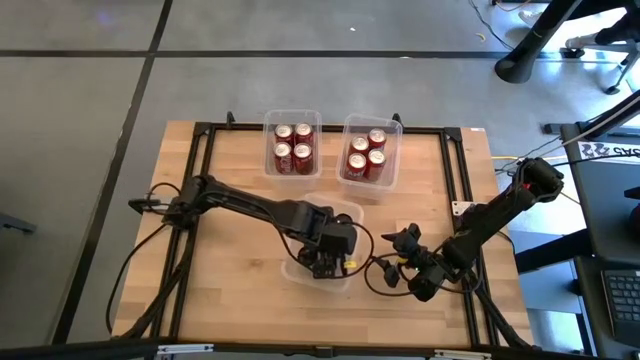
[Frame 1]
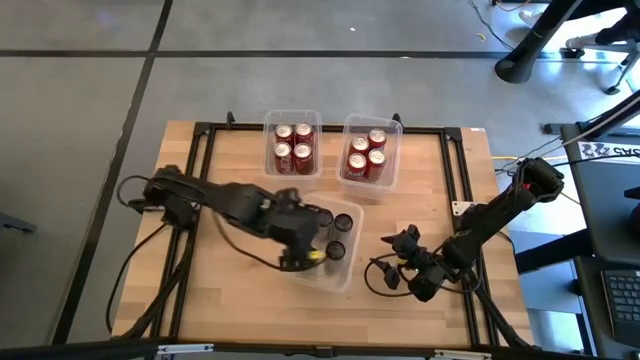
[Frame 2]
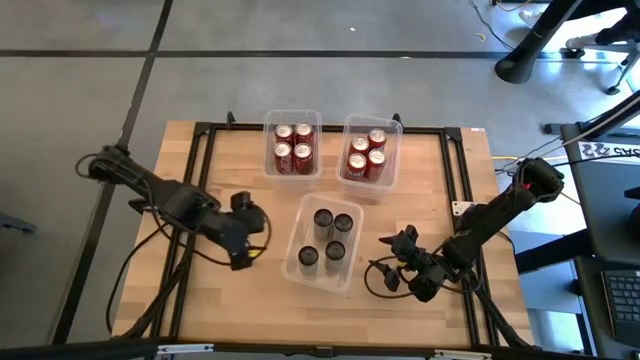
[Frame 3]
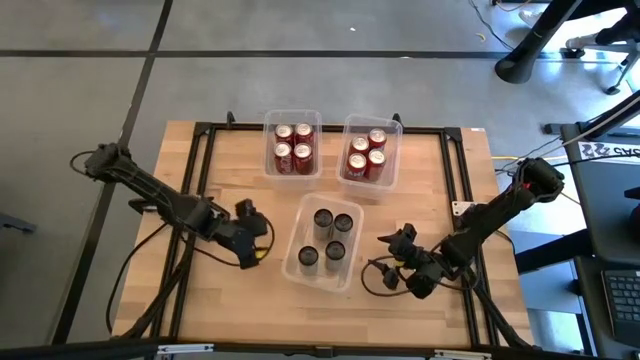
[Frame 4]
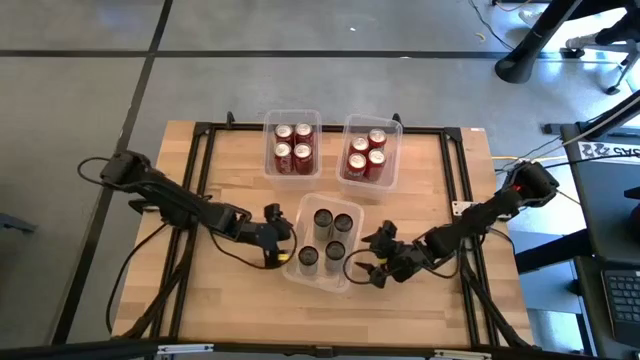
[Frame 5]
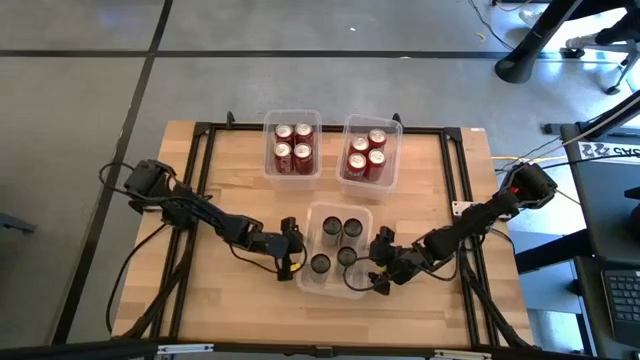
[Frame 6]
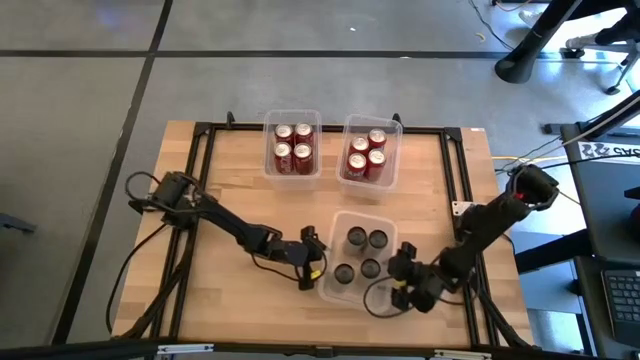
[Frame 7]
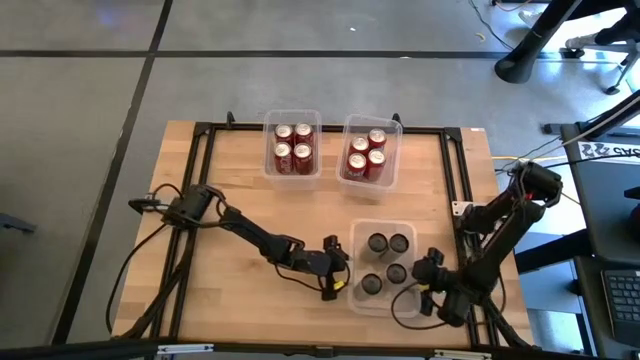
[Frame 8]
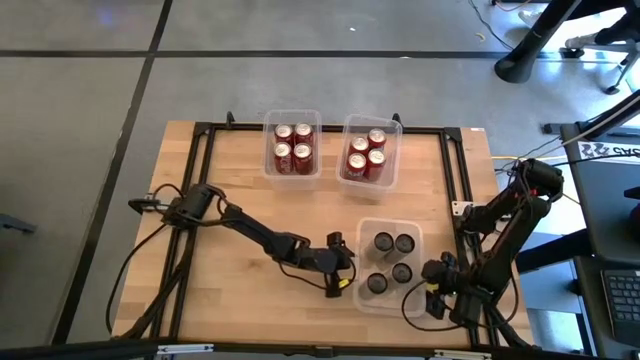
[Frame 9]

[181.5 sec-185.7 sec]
Task: Sort soda cans
Move the bottom center transparent bin to the bottom right of the table

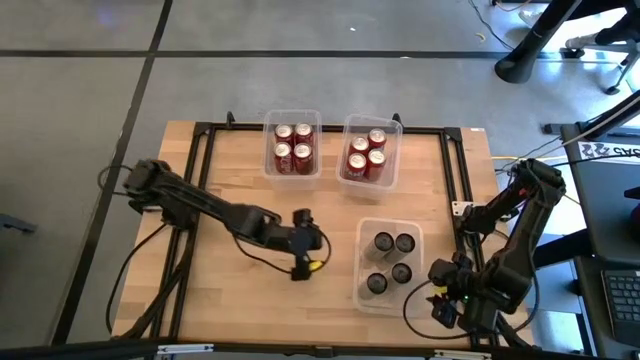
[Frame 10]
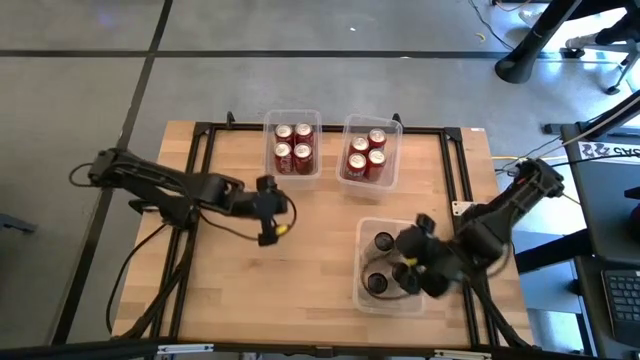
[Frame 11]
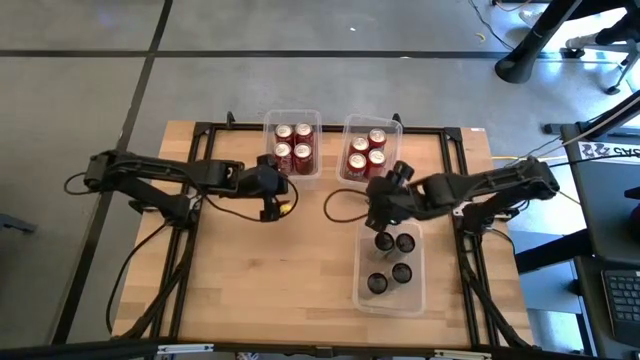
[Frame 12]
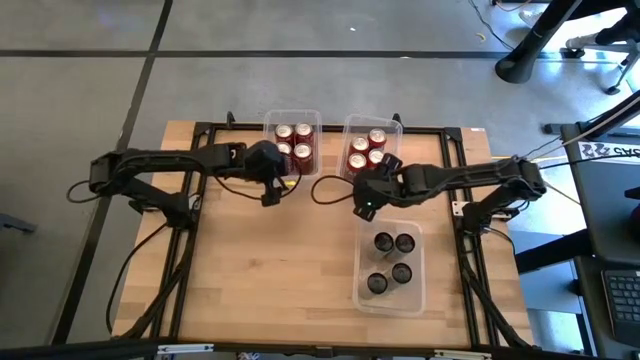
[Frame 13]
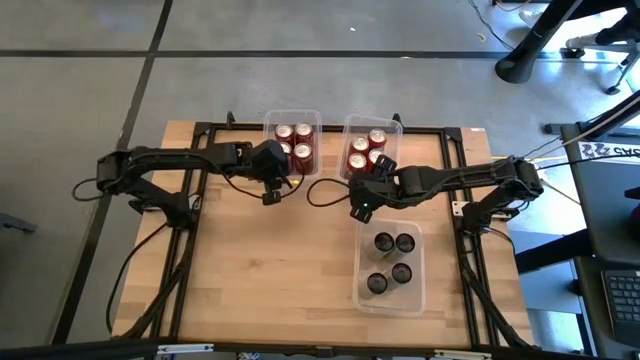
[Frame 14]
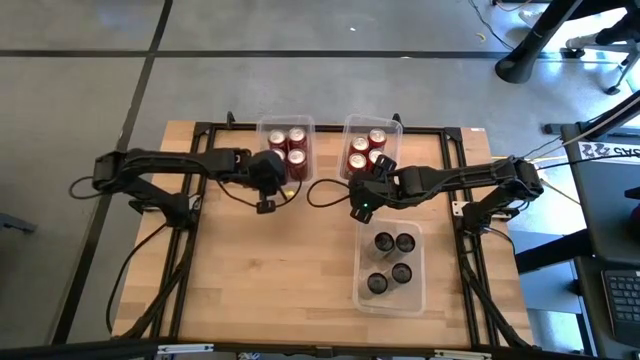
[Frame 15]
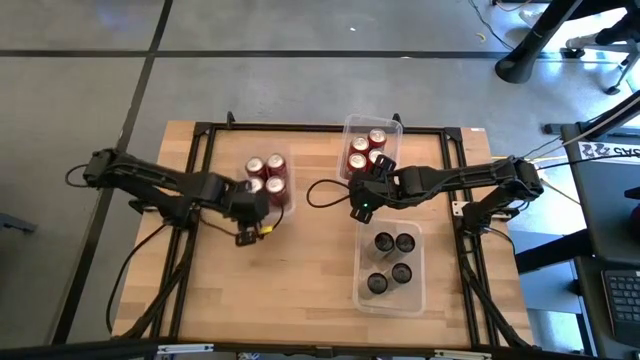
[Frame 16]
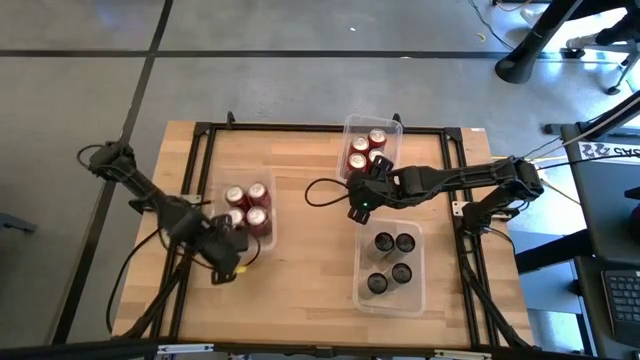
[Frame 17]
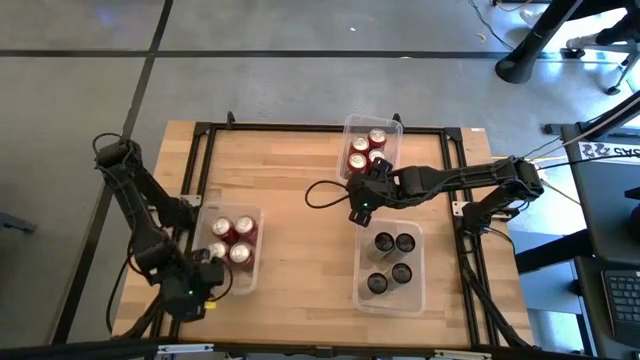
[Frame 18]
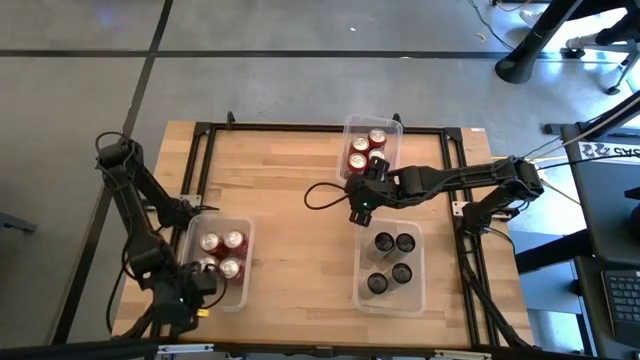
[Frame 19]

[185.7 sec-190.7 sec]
Move the top left transparent bin to the bottom left of the table

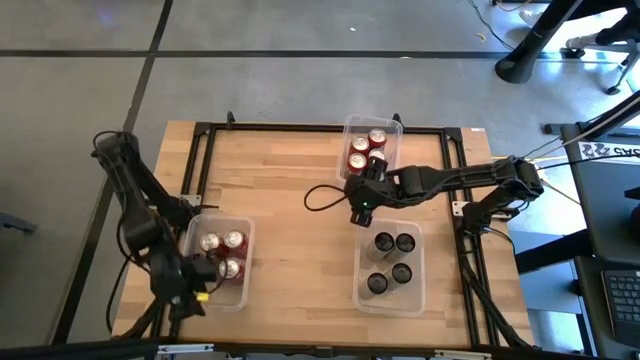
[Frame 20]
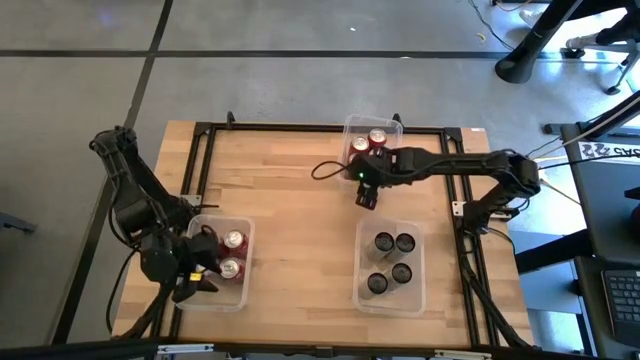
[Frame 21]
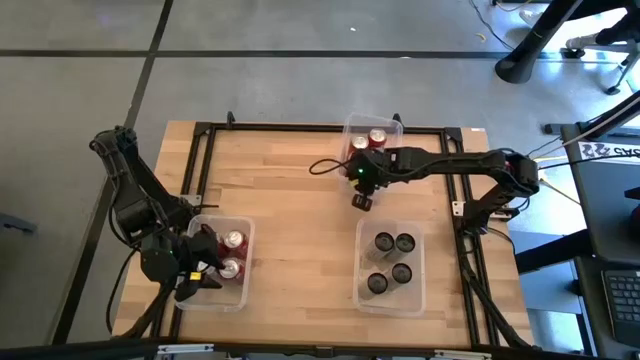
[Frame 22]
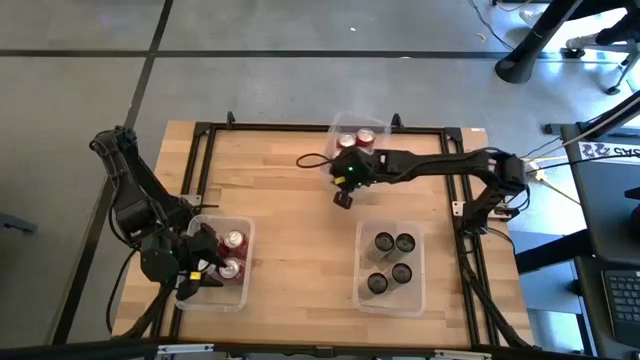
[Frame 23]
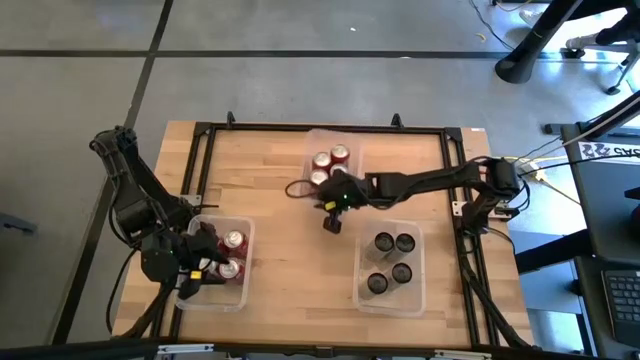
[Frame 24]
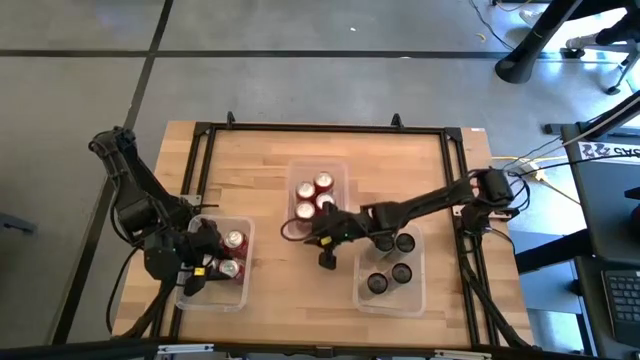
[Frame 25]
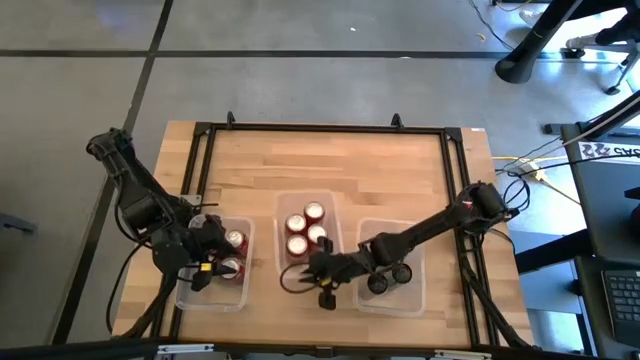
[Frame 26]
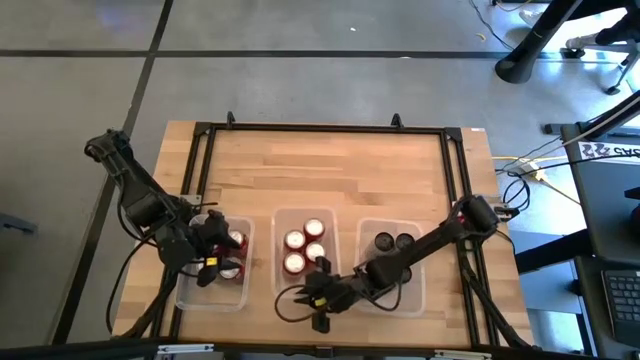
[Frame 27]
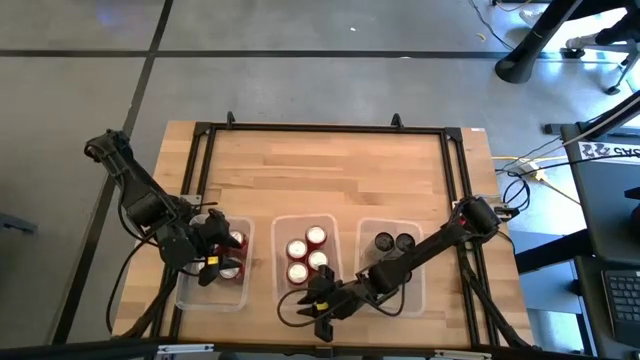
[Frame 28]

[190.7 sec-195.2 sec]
Move the top right transparent bin to the bottom center of the table

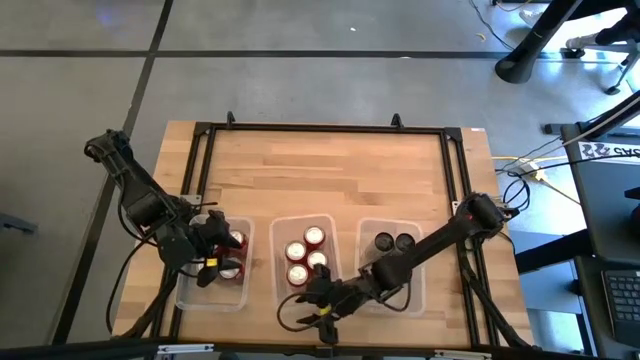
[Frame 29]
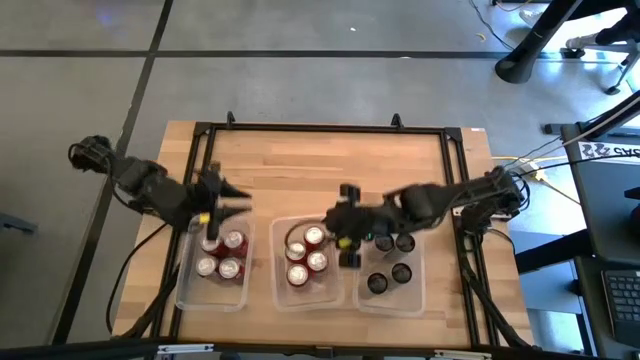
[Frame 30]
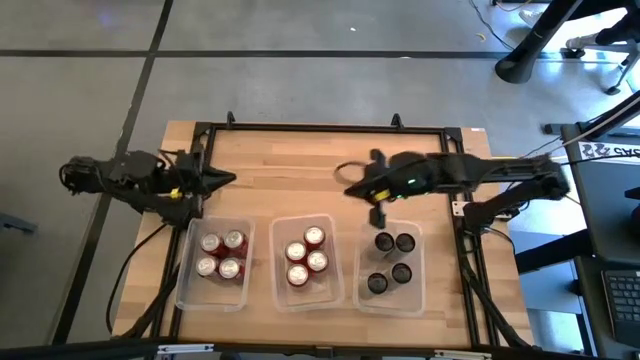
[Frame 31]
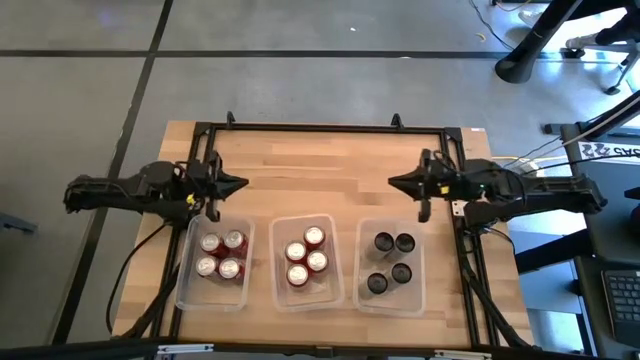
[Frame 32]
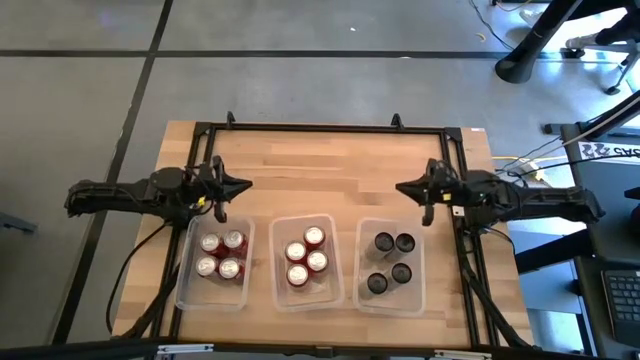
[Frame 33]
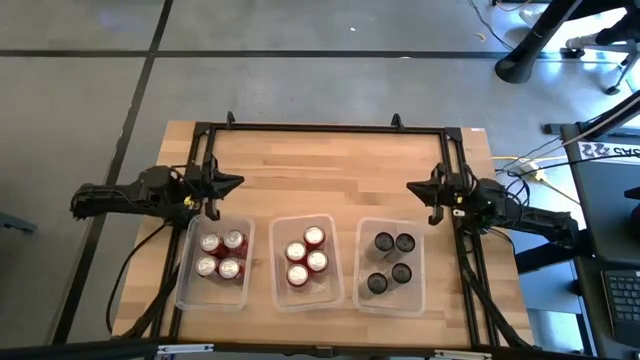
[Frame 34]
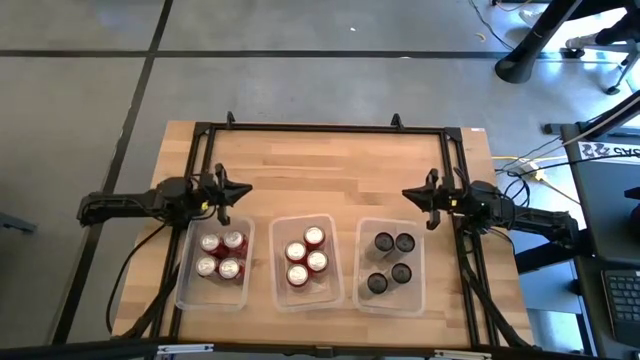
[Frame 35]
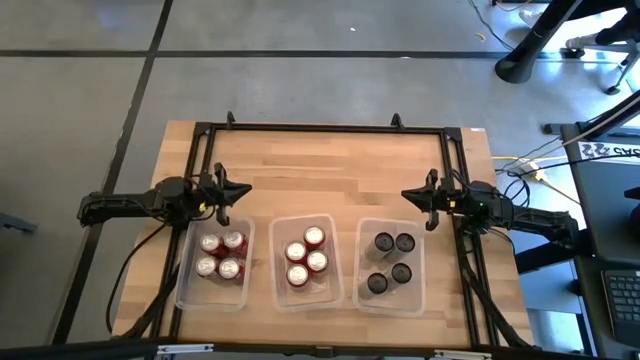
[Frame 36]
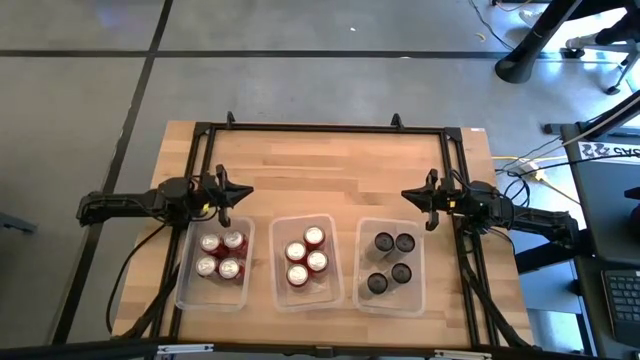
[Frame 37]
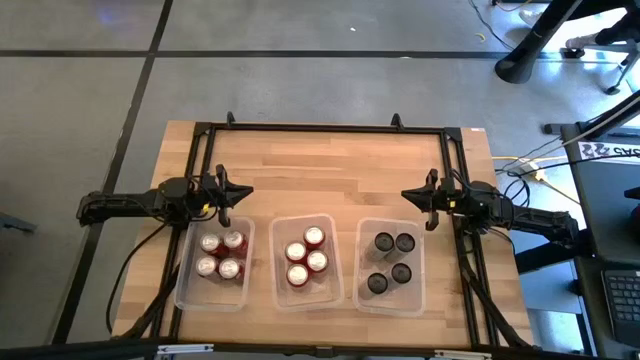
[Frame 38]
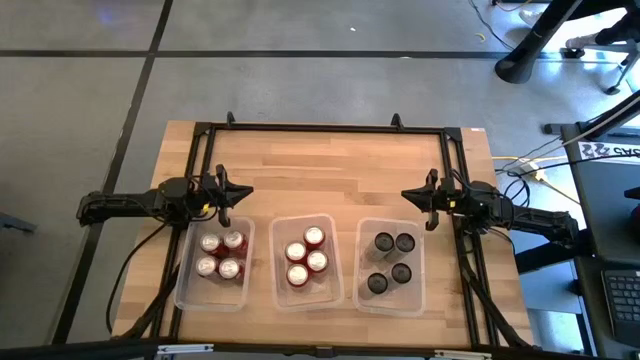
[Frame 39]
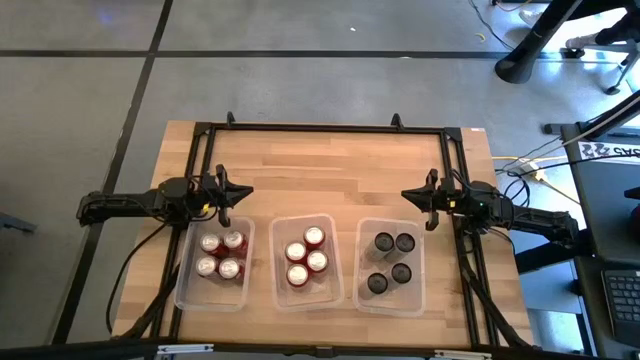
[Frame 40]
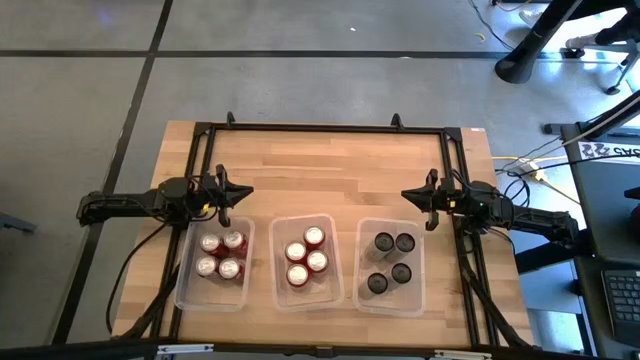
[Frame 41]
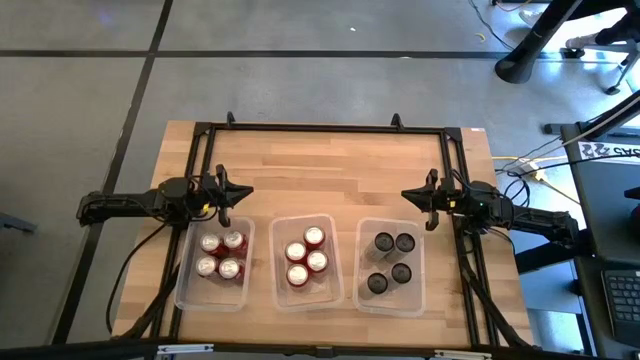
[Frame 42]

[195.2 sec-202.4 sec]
Return to Home Position
